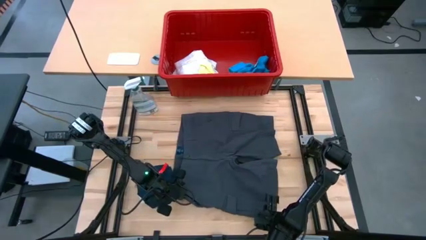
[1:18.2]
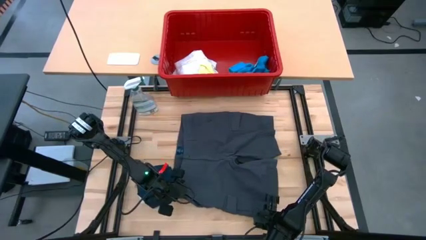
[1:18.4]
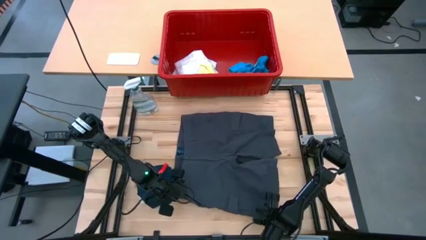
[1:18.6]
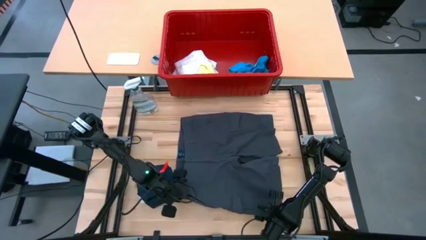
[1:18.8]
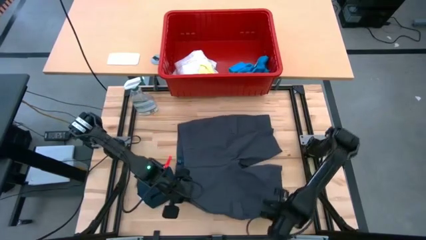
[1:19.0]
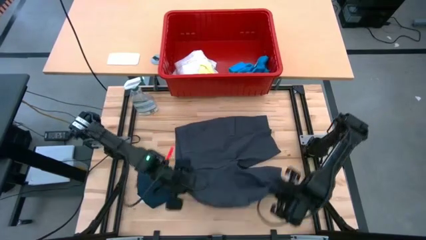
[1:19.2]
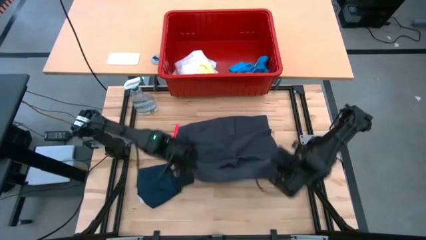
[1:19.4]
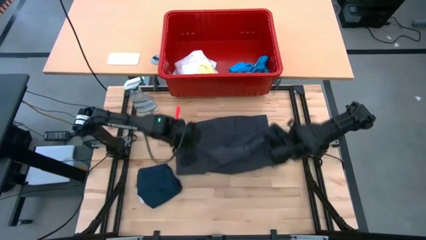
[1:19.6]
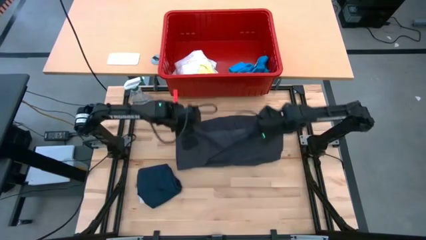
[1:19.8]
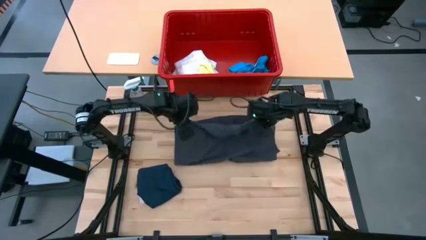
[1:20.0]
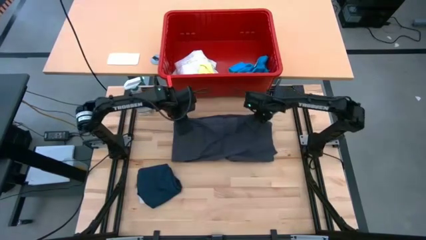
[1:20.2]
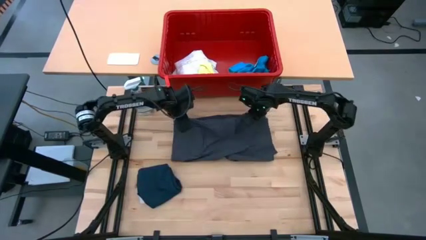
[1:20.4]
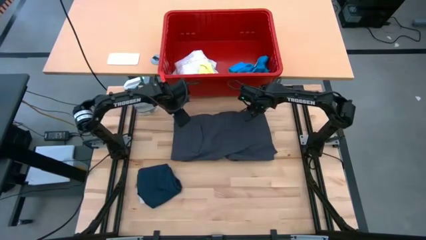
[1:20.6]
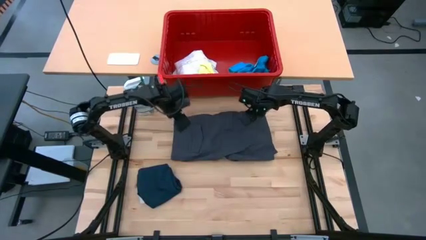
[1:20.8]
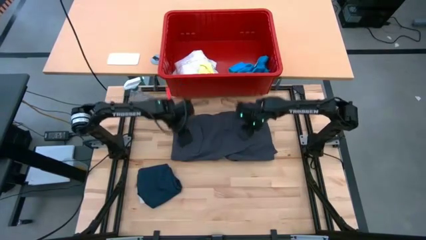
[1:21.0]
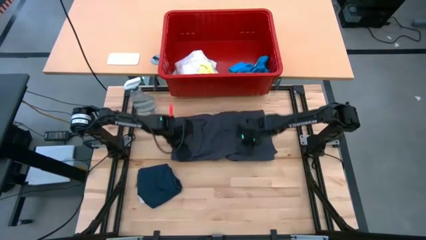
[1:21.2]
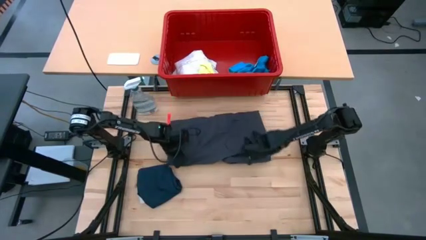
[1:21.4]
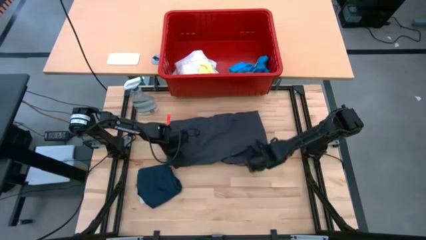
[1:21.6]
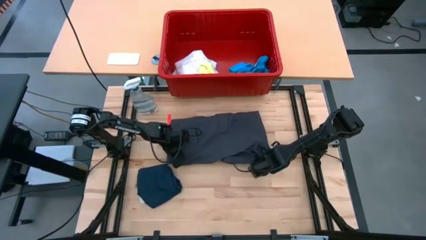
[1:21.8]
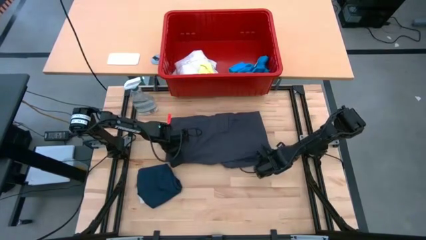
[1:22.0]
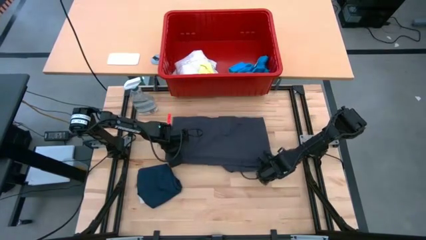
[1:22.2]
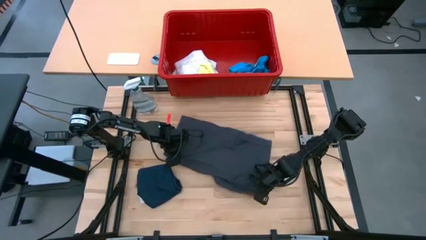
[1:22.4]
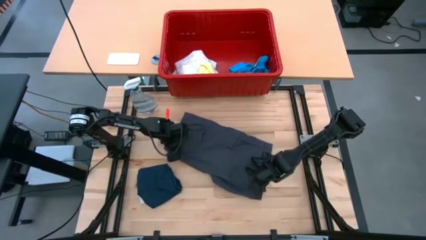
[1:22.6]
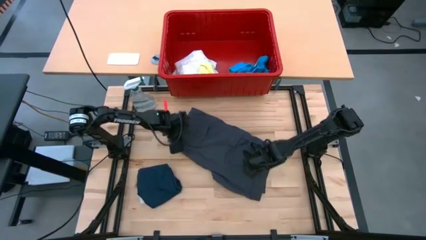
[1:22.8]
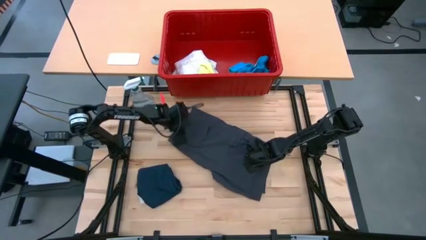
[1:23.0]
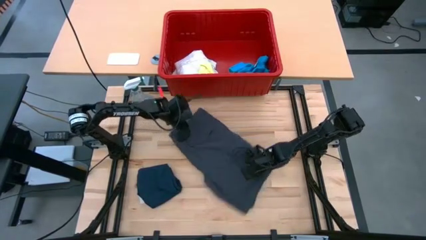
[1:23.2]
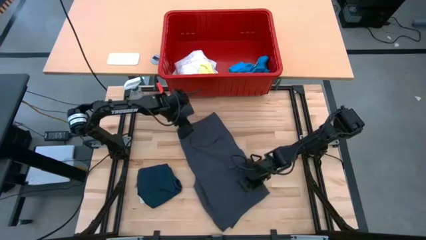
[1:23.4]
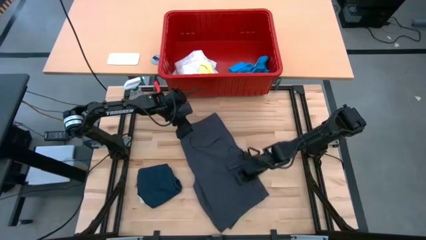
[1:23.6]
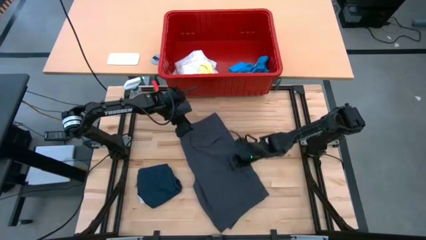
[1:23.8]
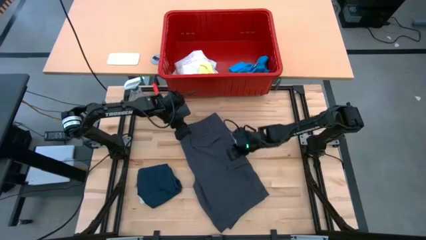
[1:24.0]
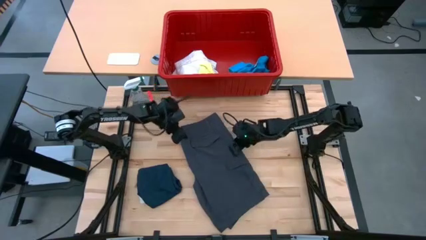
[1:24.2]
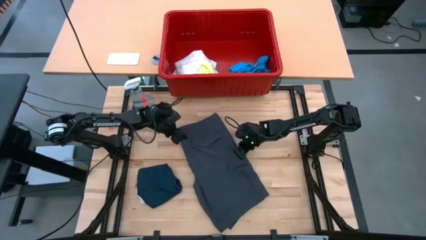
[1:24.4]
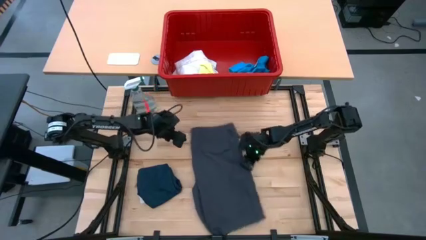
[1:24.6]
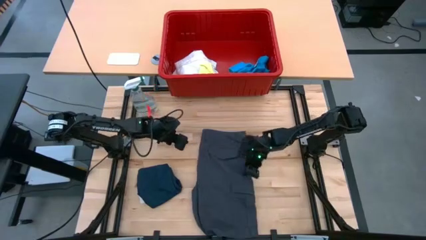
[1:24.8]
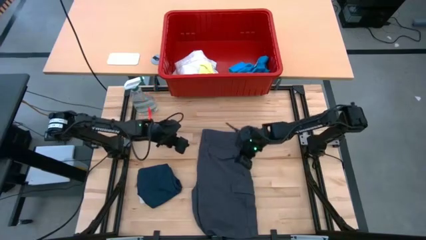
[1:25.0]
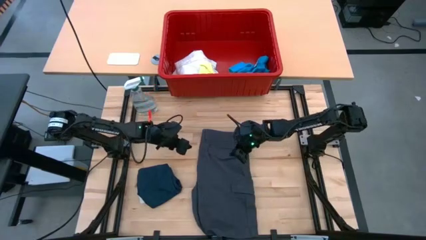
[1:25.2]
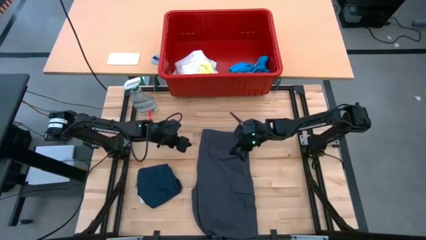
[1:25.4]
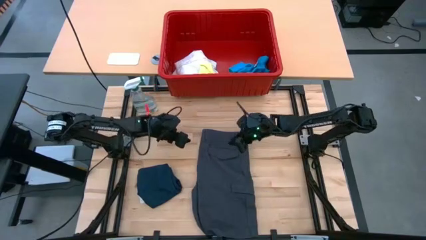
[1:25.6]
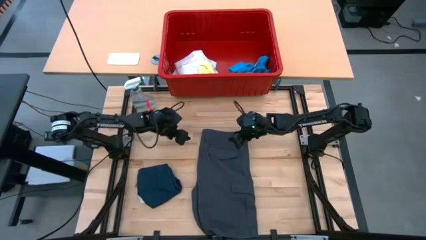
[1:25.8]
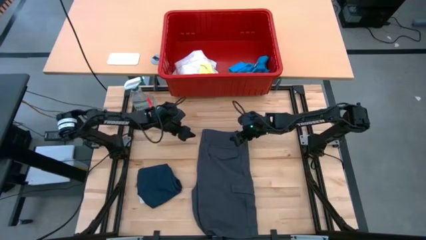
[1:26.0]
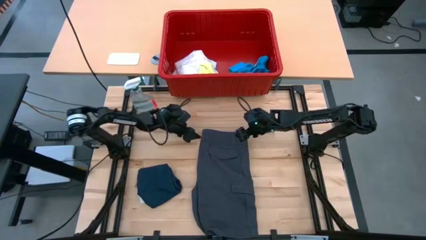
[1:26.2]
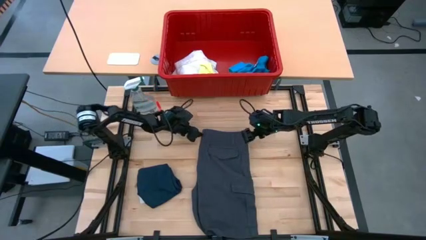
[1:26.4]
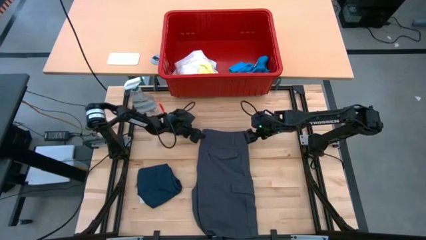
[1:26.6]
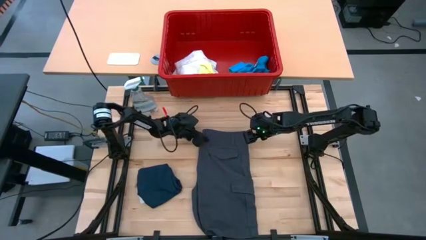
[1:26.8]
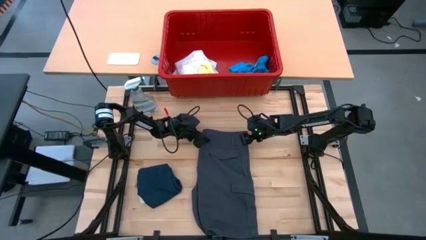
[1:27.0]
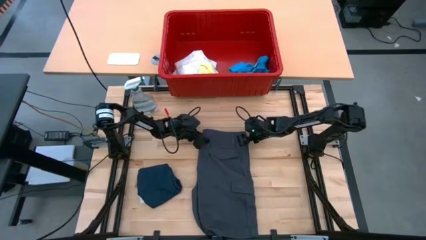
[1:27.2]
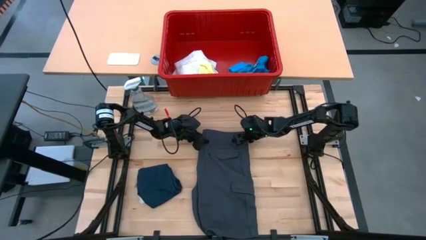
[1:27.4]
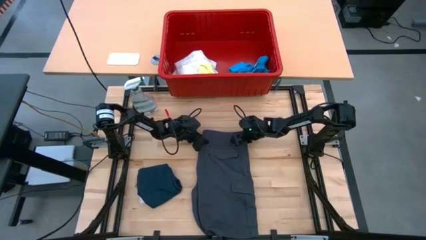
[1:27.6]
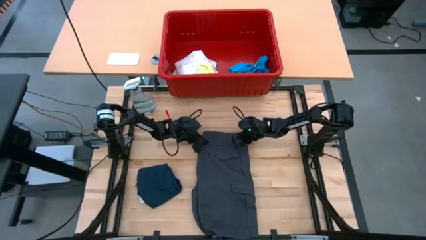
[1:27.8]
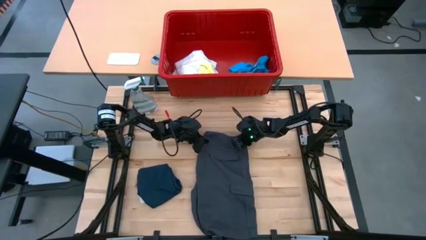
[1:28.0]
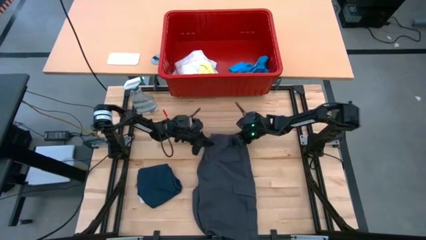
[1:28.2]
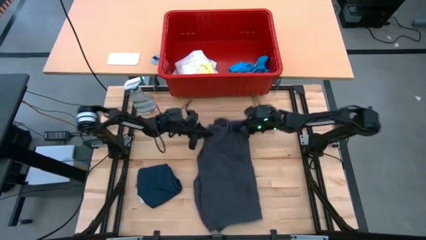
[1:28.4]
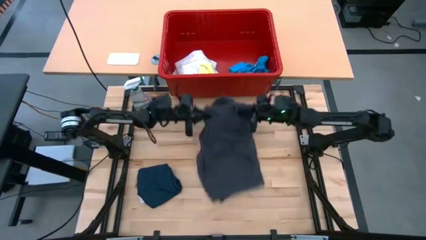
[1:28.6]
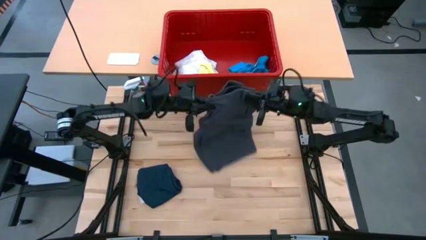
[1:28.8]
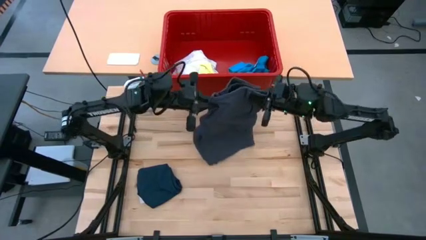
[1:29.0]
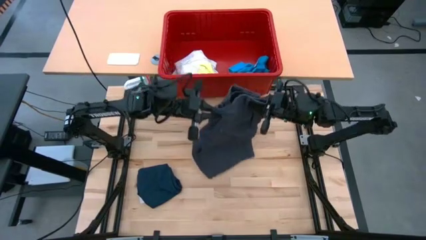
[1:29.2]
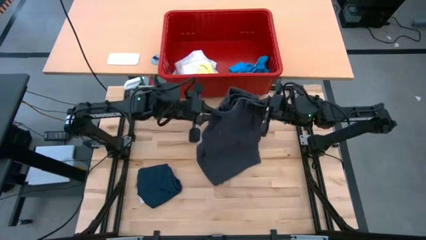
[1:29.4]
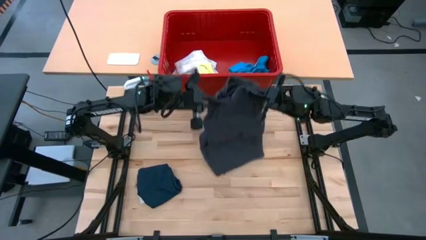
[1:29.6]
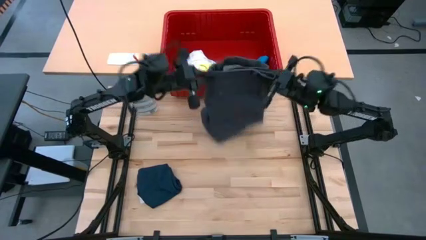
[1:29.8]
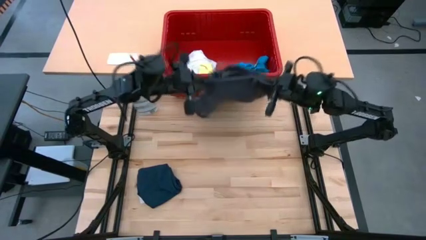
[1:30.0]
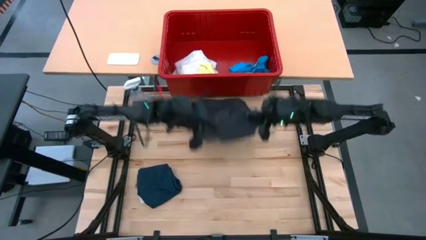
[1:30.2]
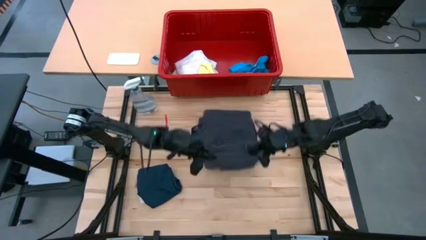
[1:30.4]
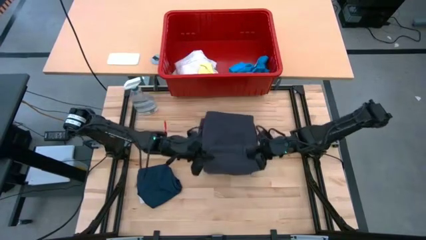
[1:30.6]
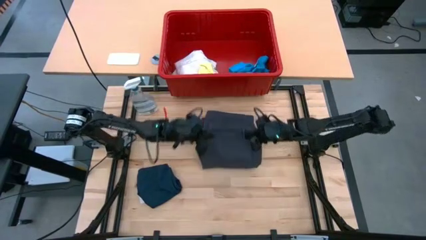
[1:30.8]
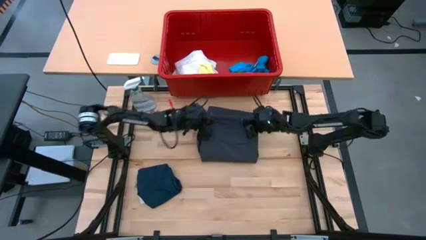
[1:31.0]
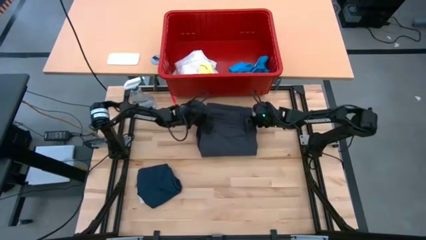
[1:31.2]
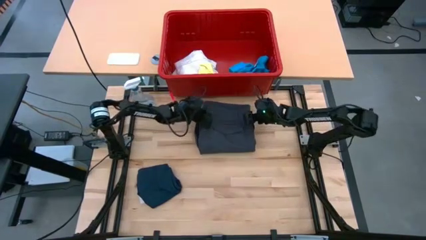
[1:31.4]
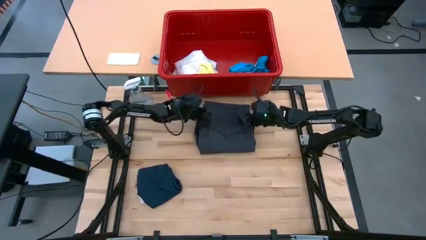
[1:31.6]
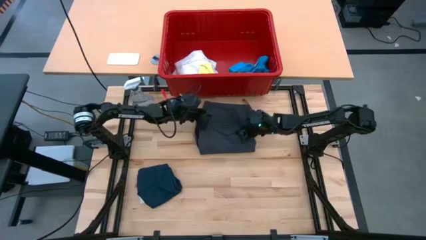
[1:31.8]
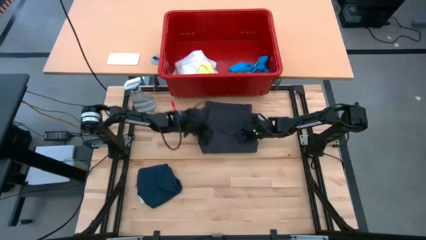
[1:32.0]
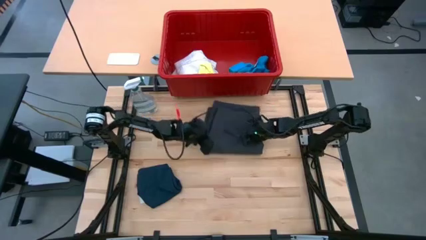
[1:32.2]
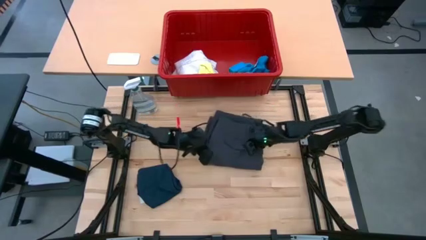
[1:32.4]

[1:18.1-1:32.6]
Task: Fold laundry
Fold the black shorts
